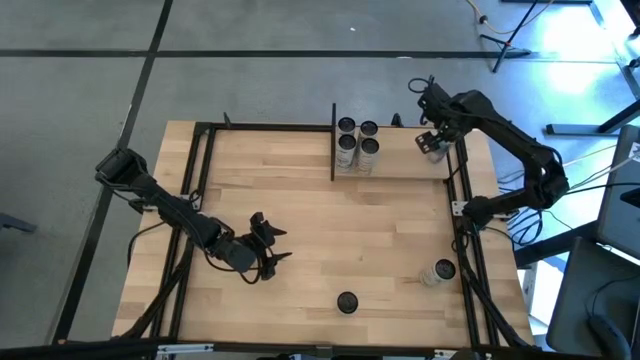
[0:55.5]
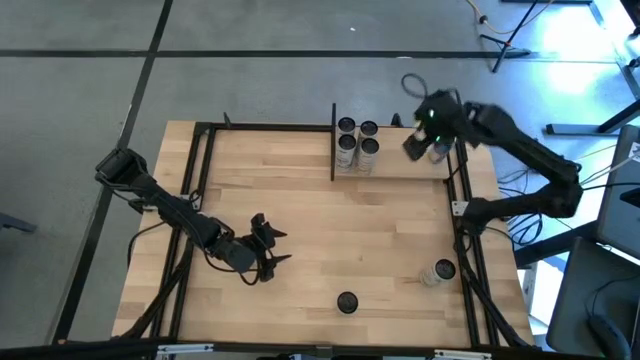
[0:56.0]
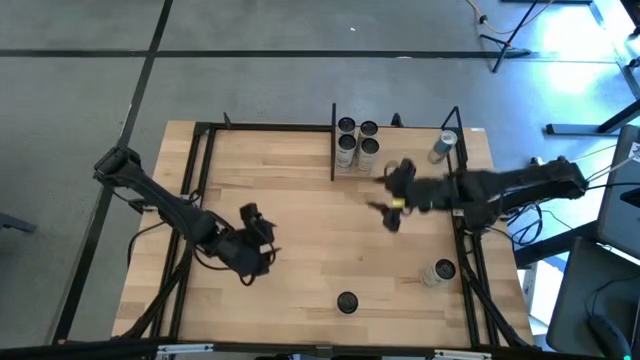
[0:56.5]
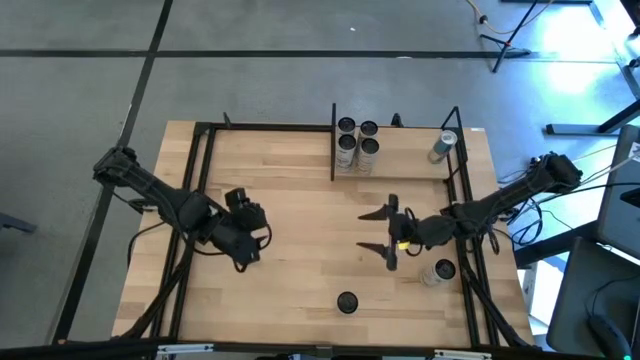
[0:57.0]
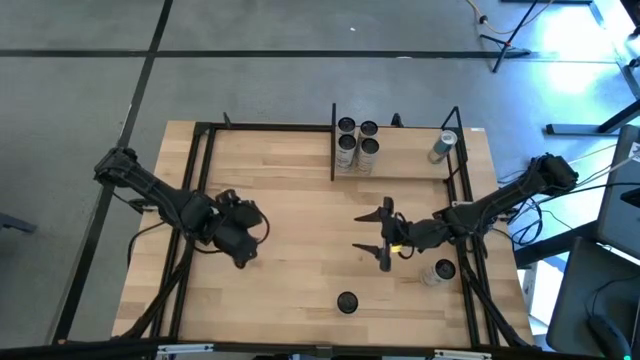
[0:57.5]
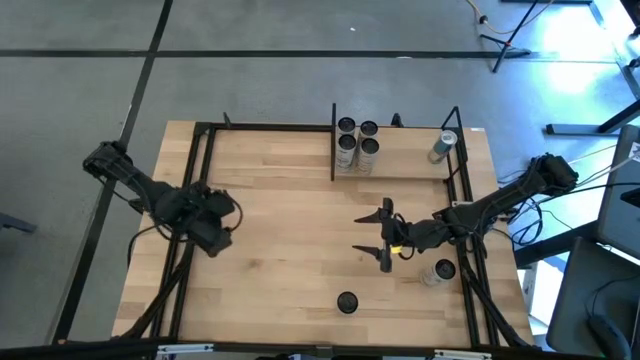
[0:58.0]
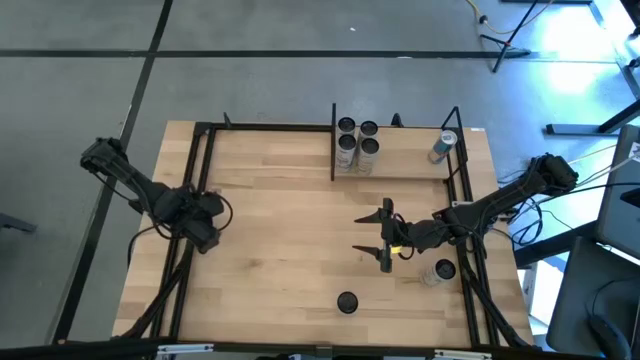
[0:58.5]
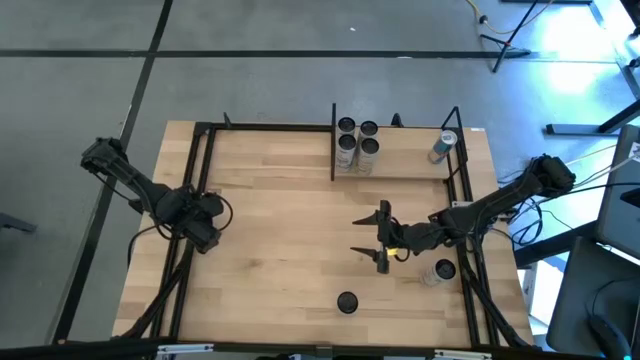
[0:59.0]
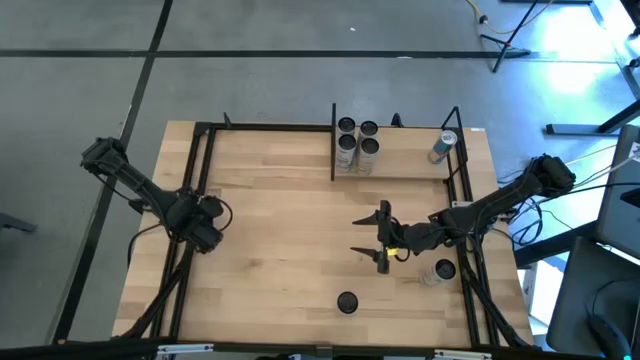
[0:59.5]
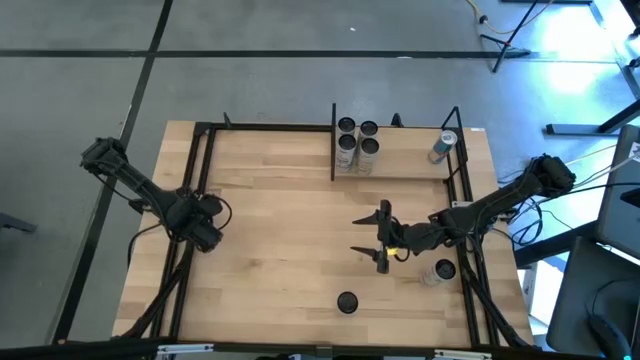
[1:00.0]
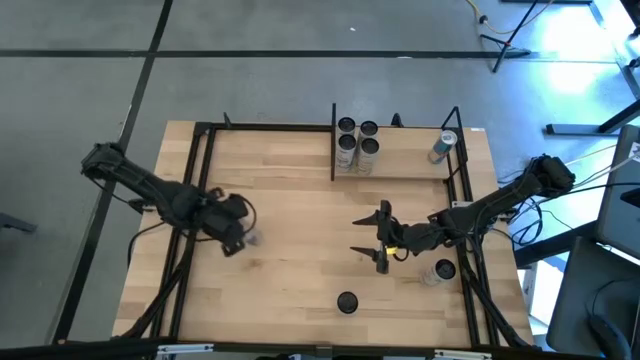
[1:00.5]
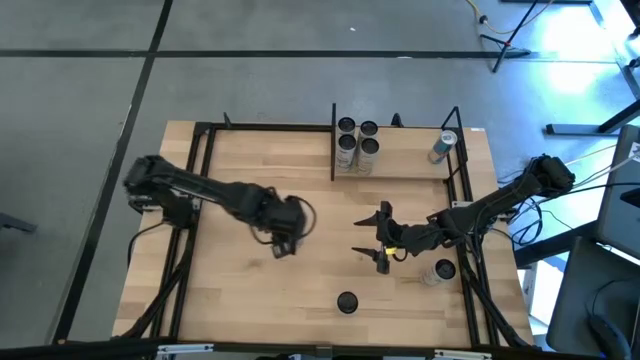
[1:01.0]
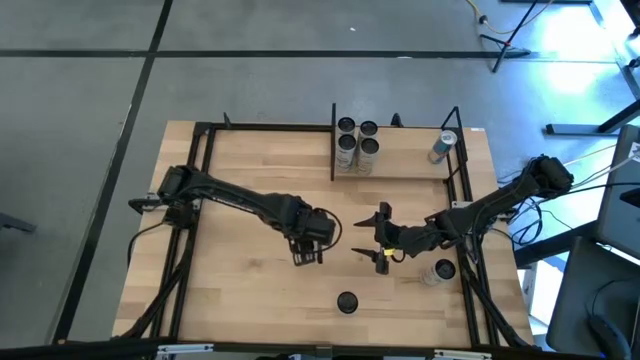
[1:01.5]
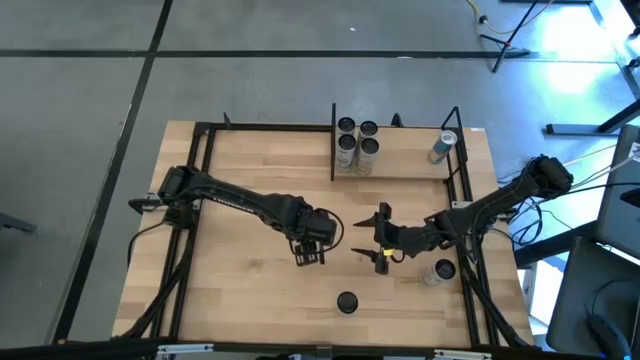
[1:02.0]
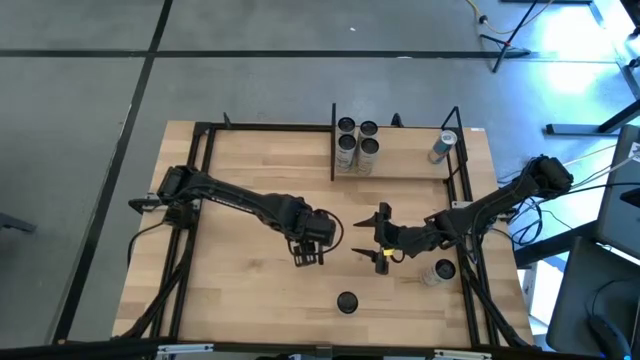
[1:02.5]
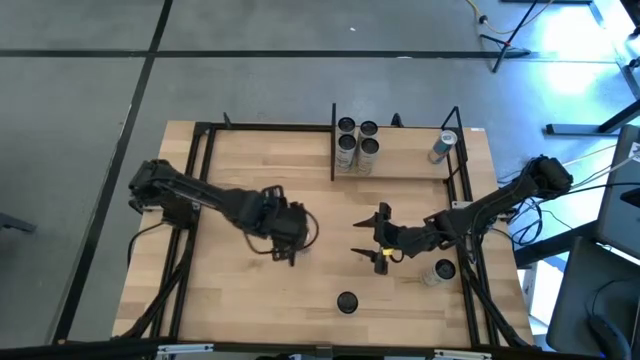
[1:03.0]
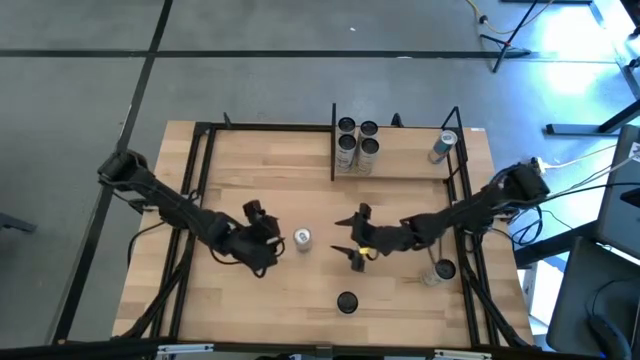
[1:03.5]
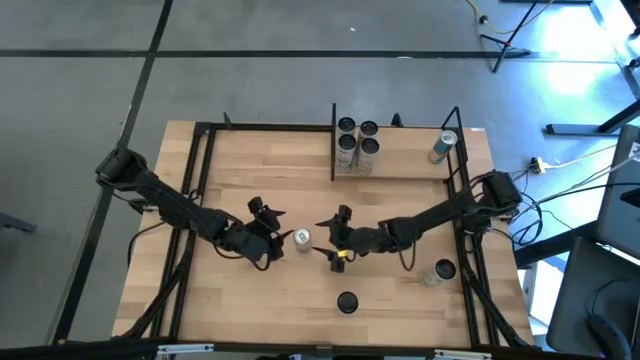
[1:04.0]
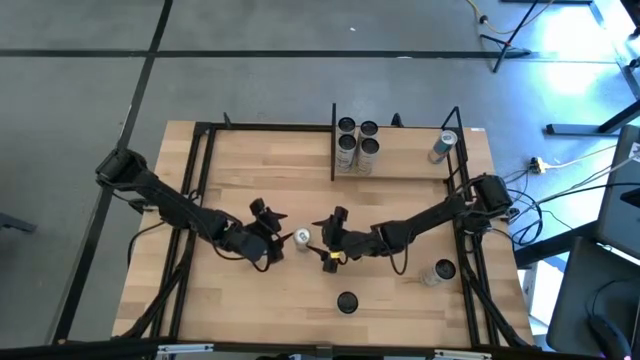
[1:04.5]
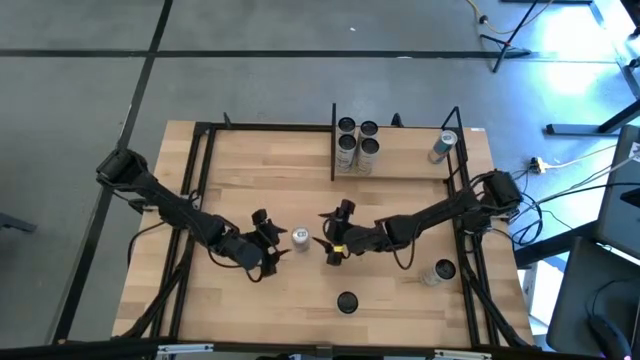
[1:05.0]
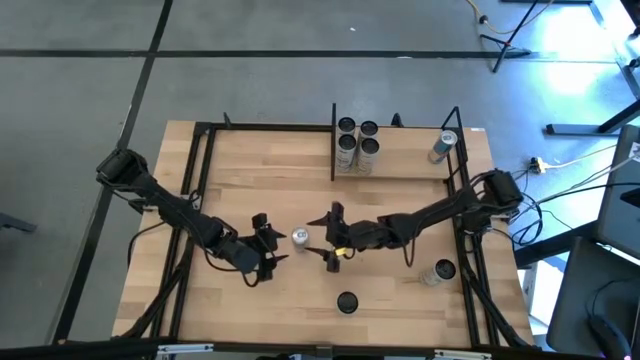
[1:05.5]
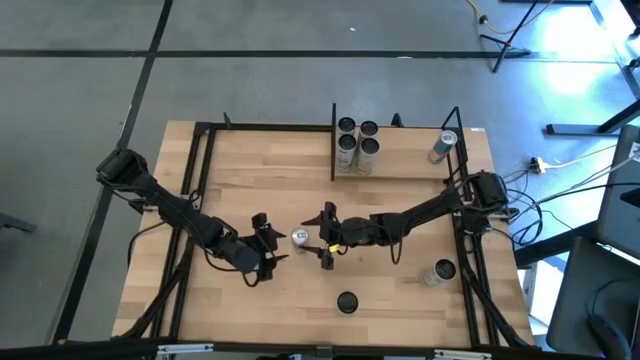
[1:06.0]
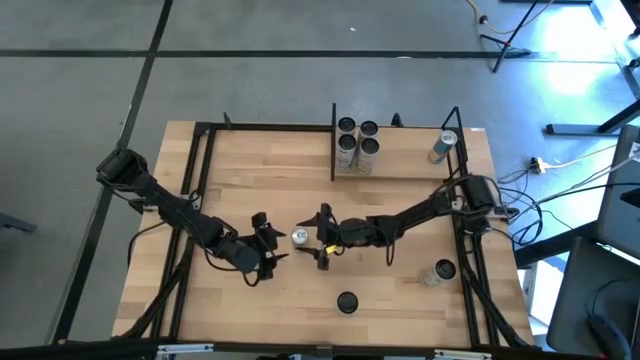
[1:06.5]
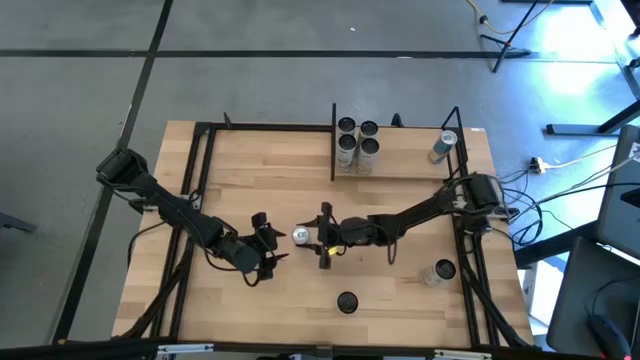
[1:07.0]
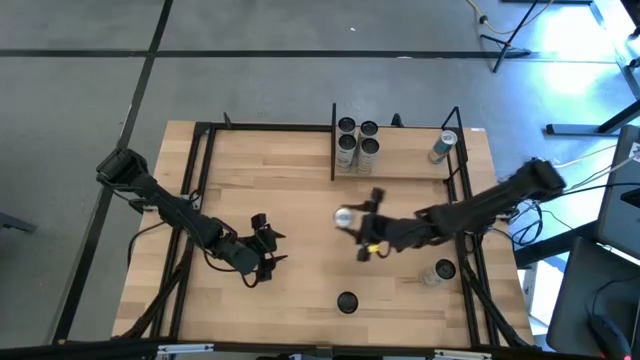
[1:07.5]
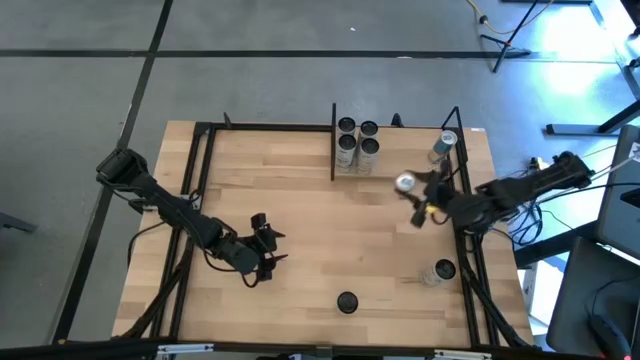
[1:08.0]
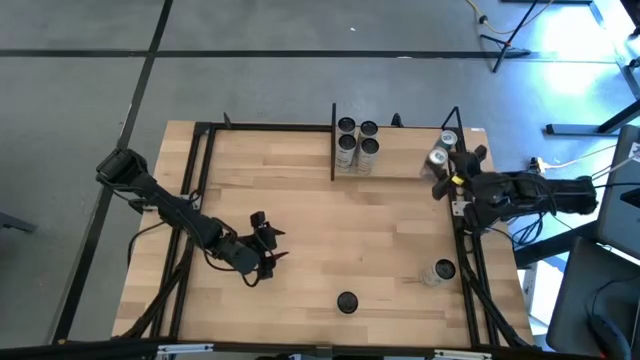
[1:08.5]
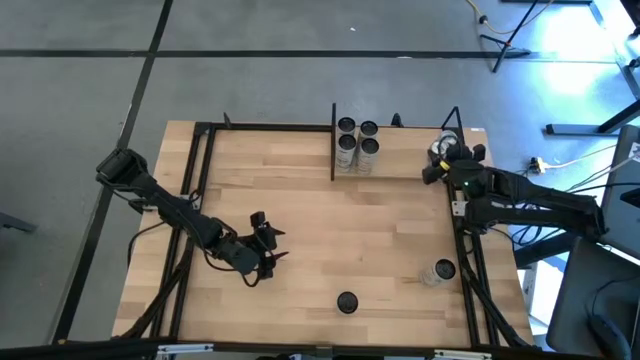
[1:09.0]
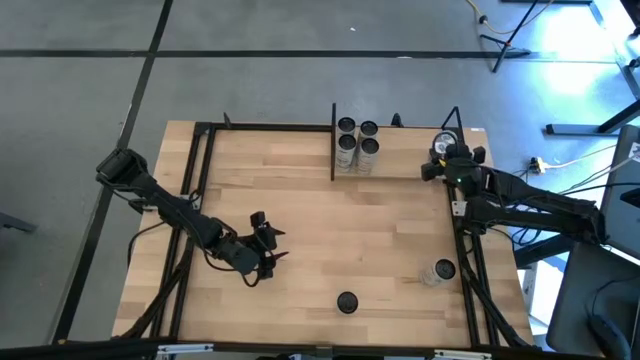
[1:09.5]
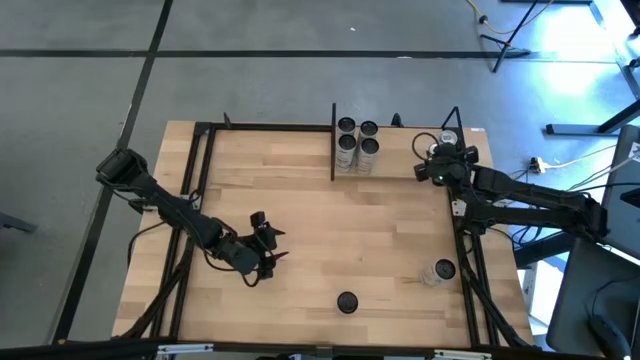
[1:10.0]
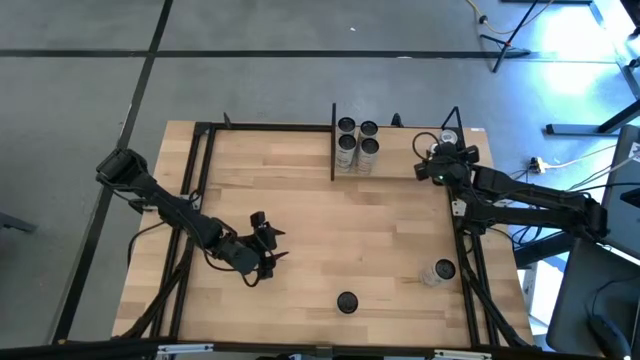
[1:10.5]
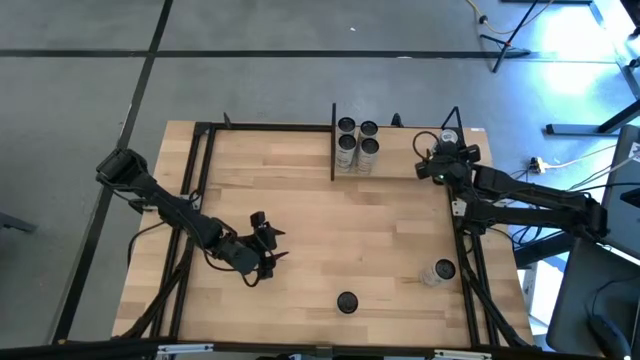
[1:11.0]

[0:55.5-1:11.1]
Task: Place canned beverage on shelf
Put the blue soda can aligned with the other blue soda can on the shelf

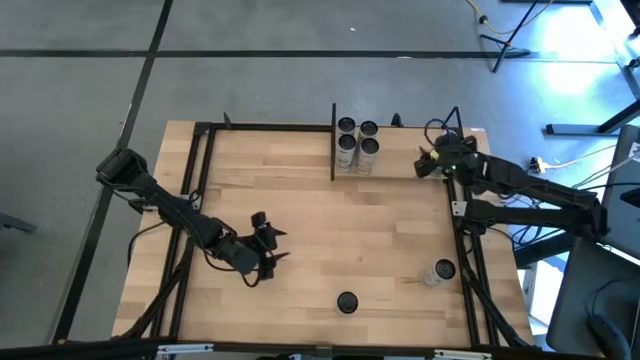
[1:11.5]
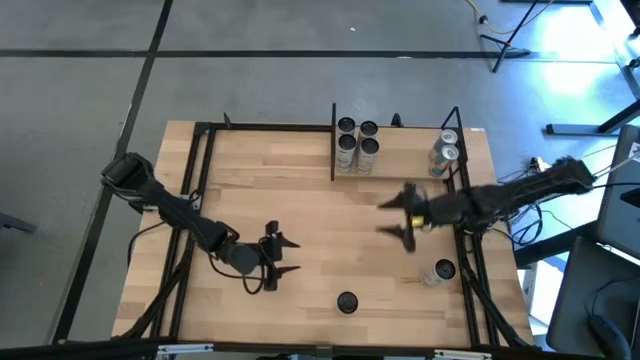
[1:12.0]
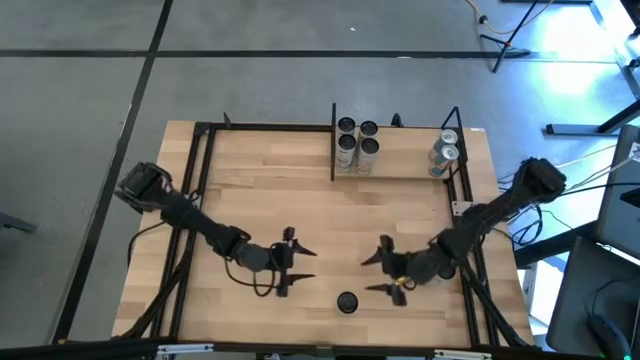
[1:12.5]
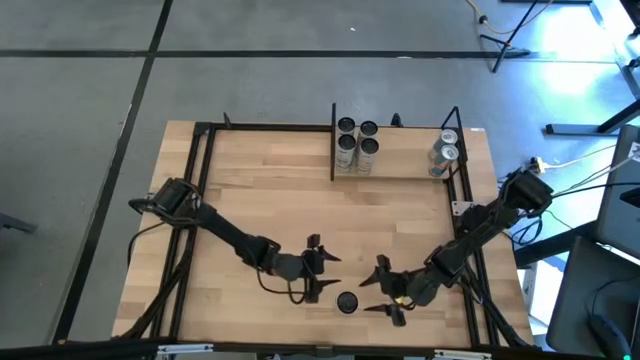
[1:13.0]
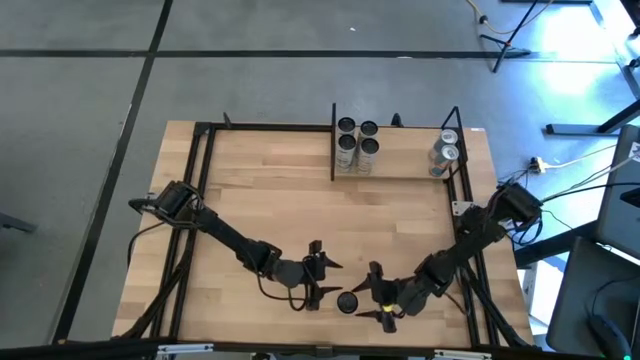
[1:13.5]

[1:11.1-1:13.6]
Put the top white-pink soda can on the shelf

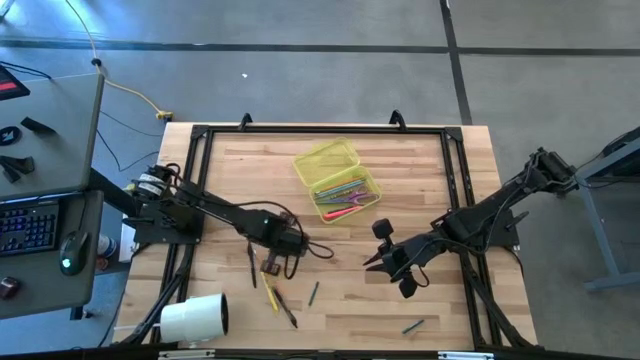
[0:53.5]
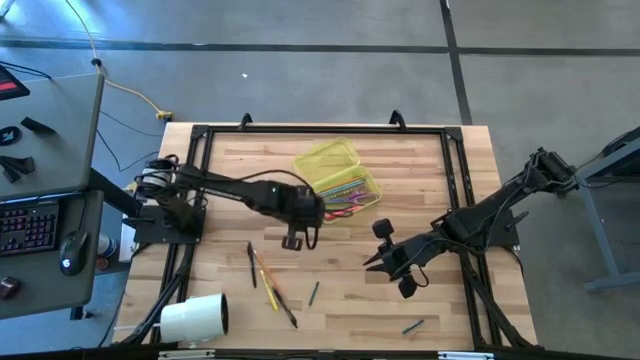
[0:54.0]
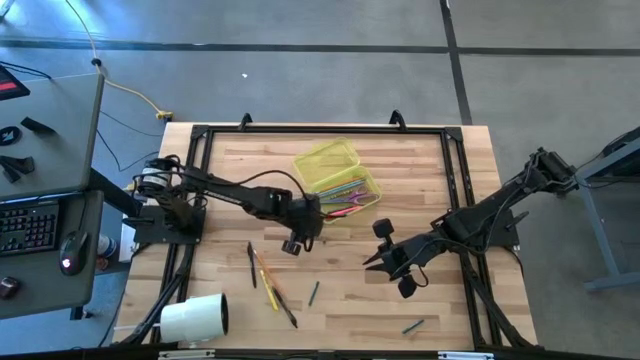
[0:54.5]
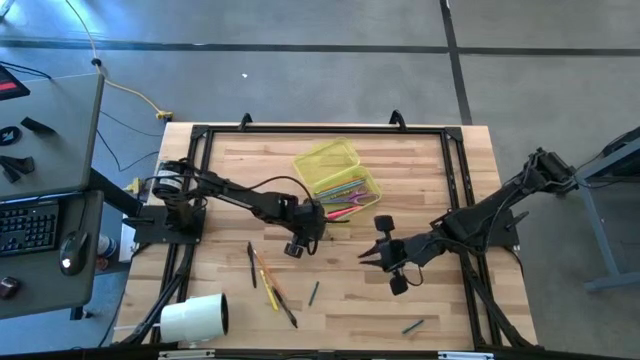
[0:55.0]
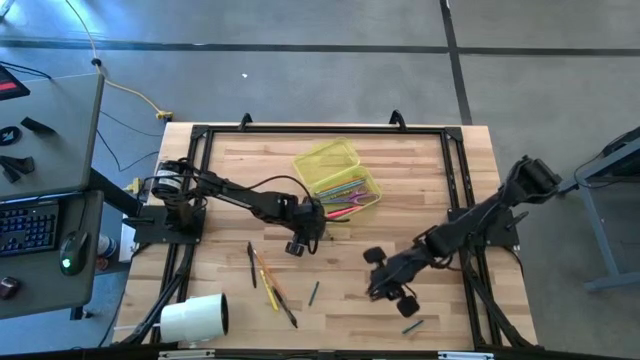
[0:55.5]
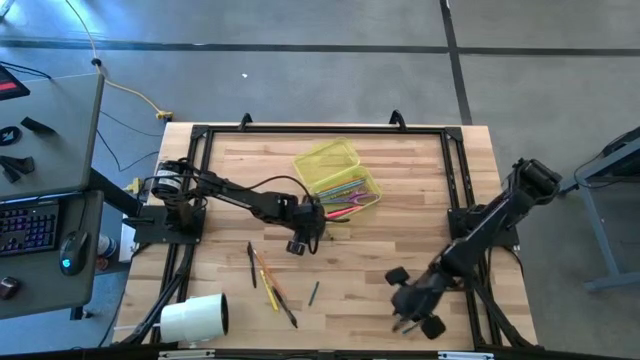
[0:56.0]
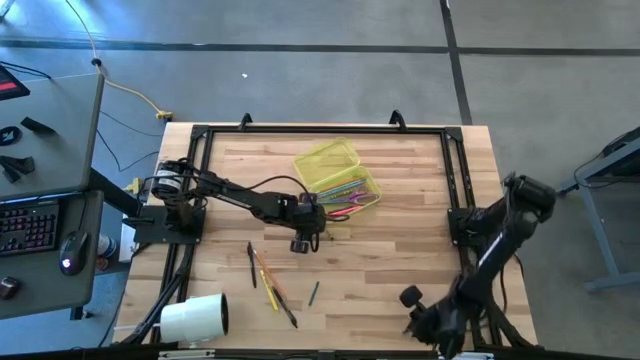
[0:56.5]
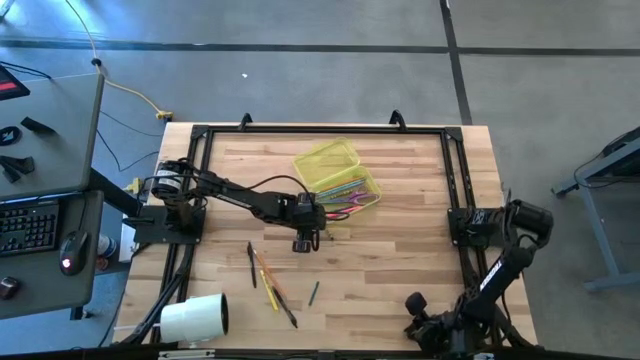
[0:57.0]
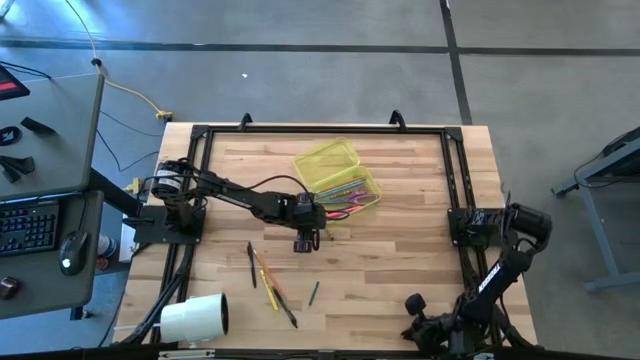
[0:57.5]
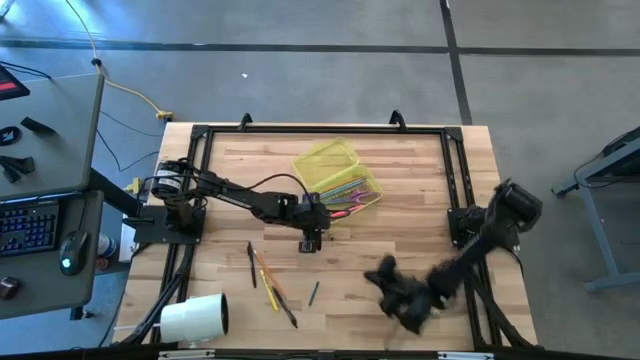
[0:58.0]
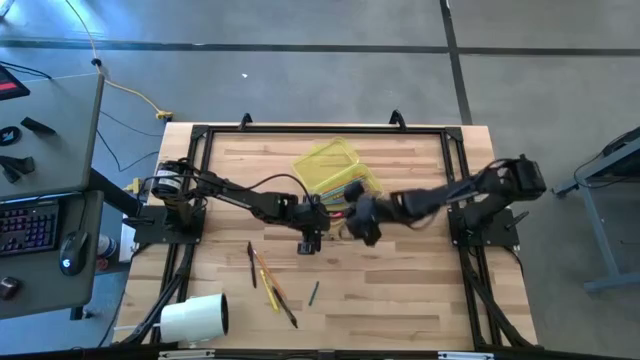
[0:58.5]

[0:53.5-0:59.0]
Task: Pick & place school supplies into a supply box
Put the right blue crayon into the supply box
